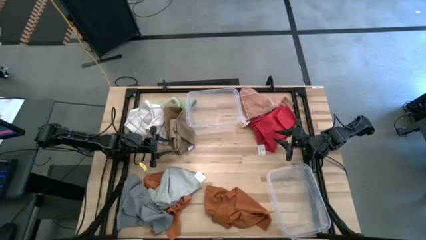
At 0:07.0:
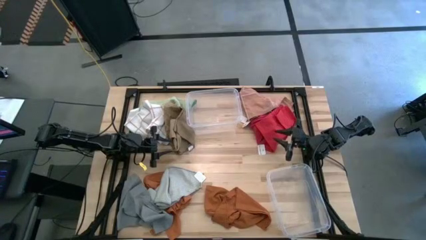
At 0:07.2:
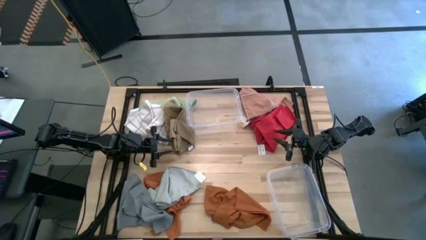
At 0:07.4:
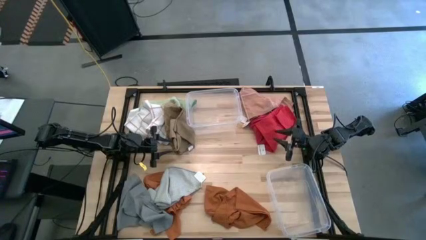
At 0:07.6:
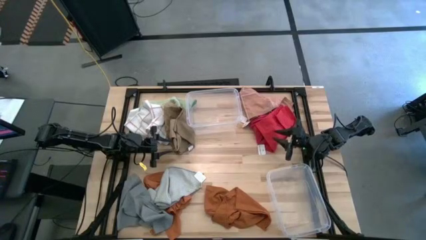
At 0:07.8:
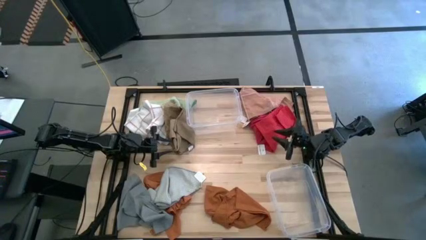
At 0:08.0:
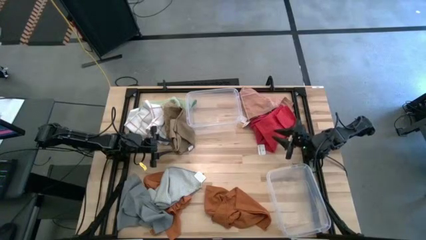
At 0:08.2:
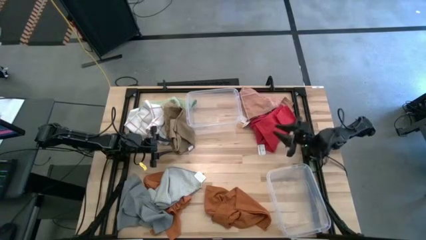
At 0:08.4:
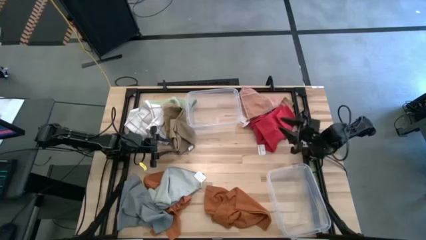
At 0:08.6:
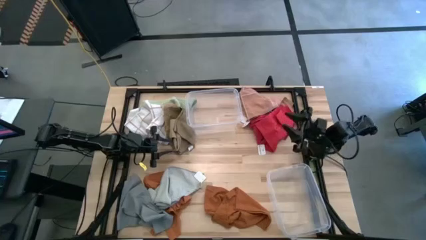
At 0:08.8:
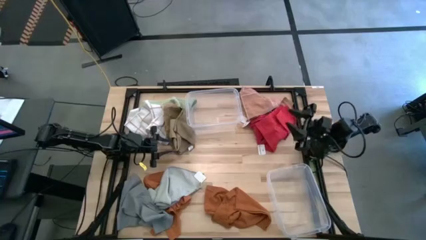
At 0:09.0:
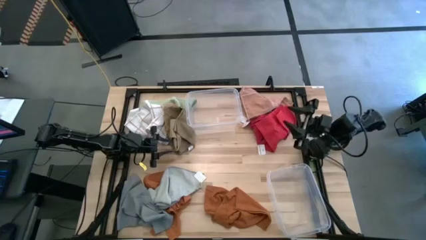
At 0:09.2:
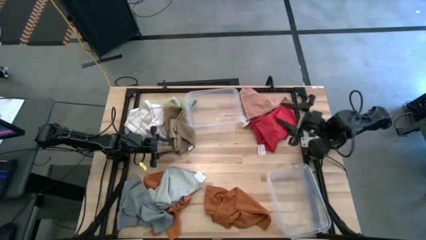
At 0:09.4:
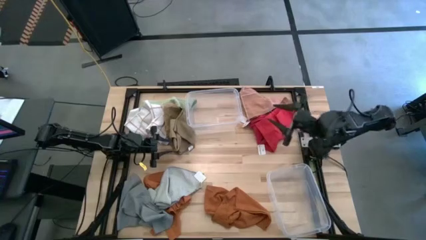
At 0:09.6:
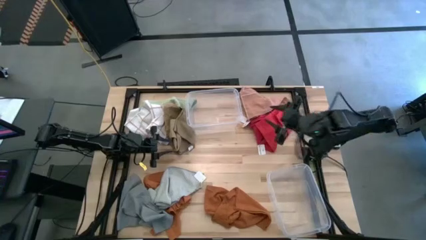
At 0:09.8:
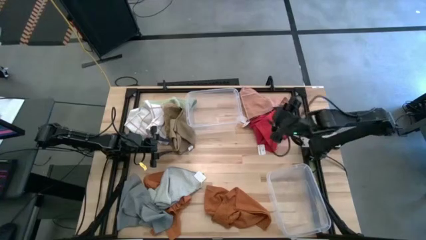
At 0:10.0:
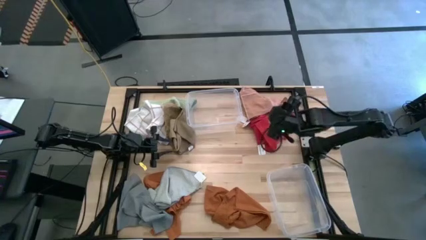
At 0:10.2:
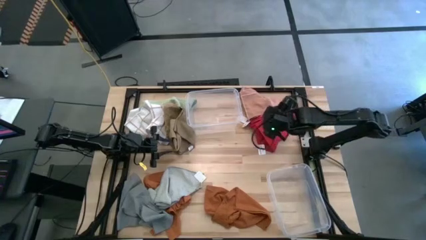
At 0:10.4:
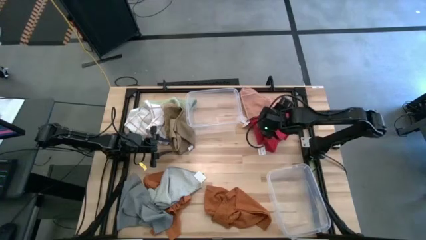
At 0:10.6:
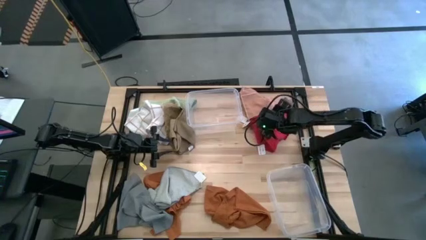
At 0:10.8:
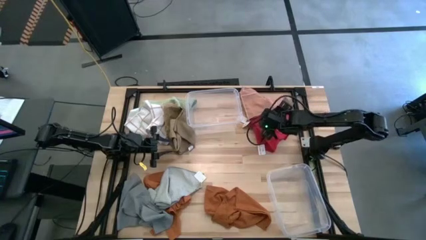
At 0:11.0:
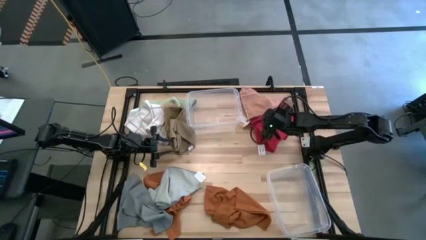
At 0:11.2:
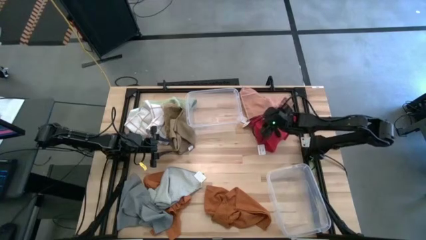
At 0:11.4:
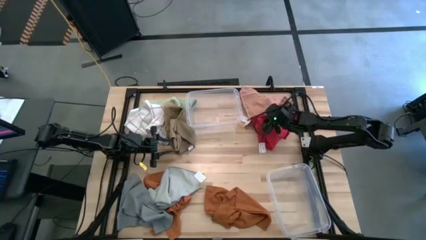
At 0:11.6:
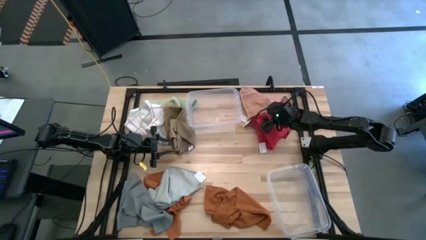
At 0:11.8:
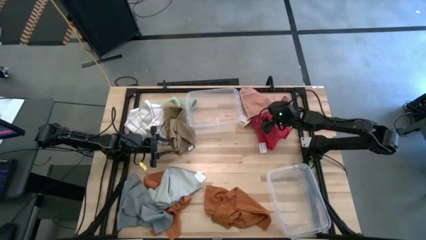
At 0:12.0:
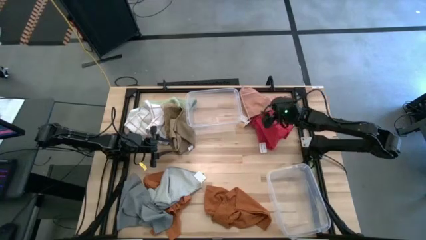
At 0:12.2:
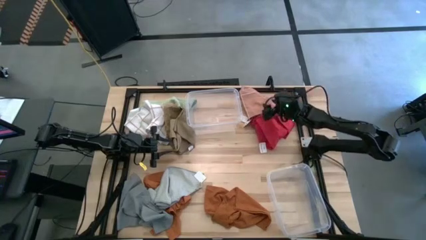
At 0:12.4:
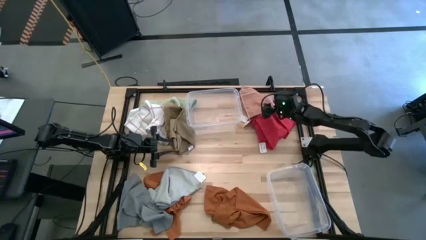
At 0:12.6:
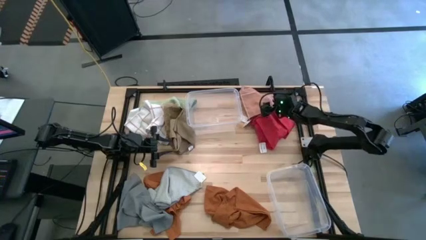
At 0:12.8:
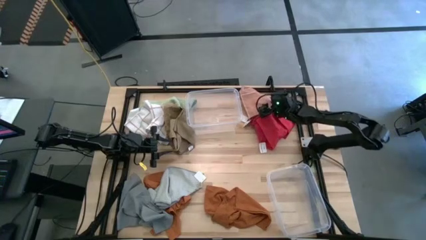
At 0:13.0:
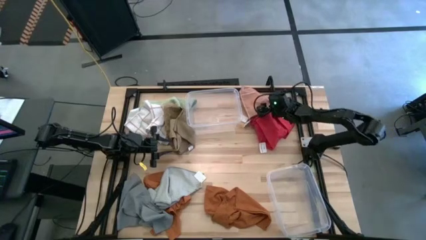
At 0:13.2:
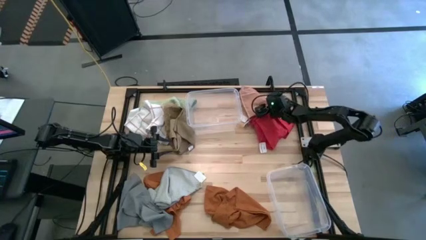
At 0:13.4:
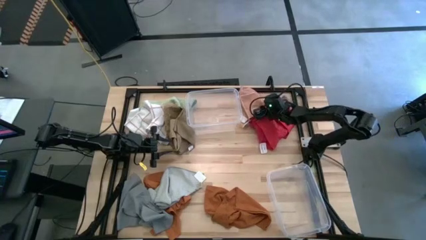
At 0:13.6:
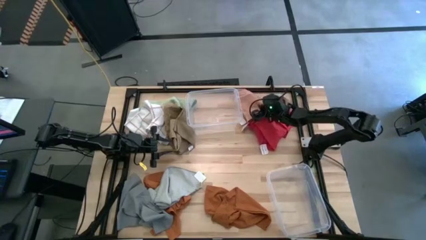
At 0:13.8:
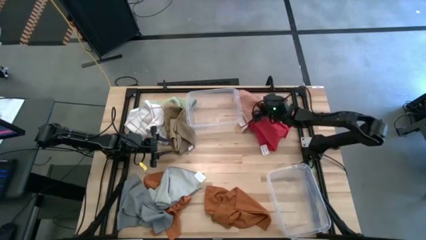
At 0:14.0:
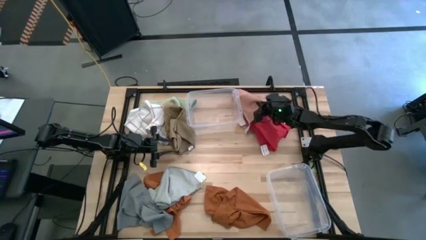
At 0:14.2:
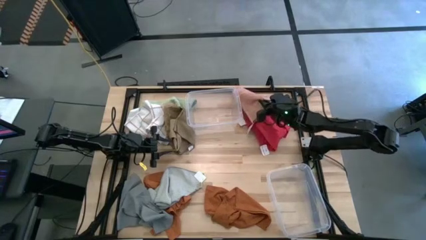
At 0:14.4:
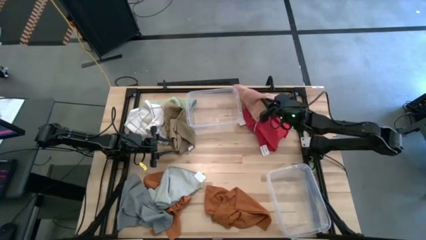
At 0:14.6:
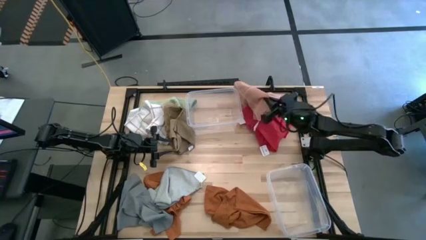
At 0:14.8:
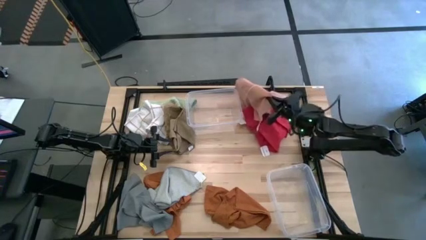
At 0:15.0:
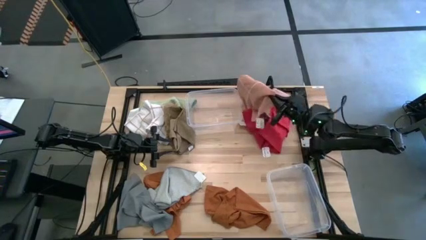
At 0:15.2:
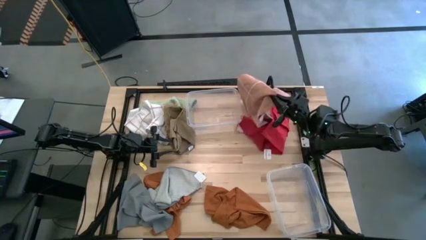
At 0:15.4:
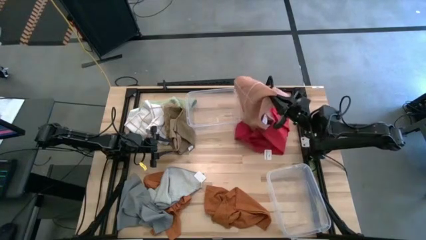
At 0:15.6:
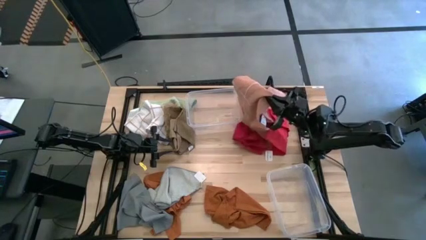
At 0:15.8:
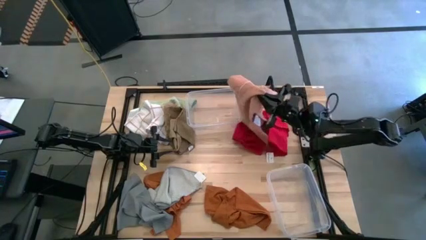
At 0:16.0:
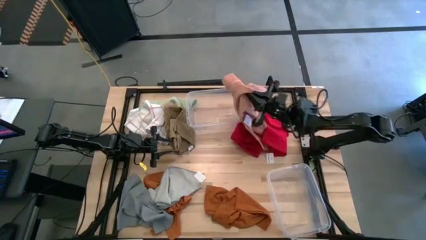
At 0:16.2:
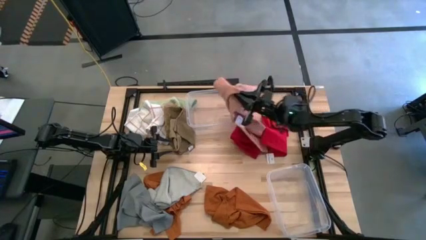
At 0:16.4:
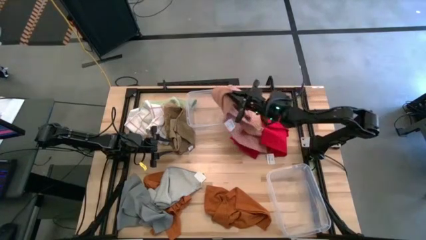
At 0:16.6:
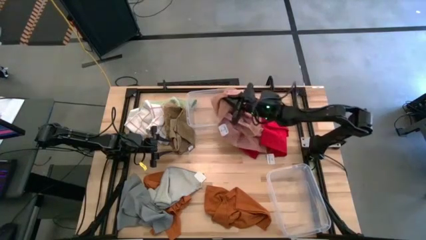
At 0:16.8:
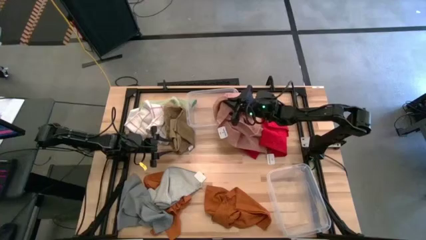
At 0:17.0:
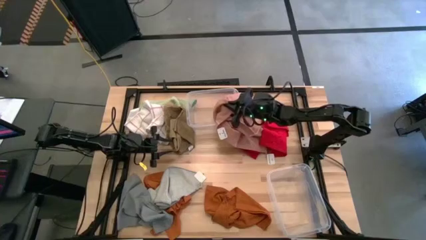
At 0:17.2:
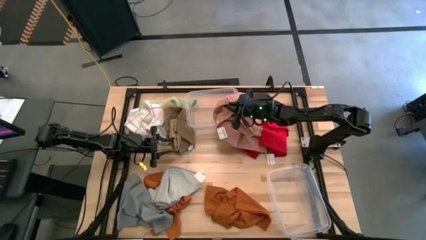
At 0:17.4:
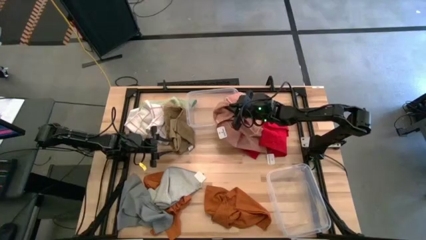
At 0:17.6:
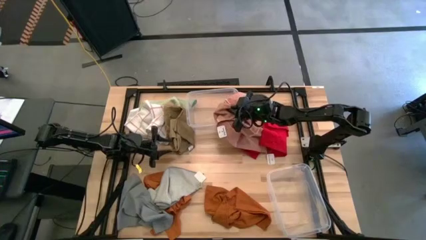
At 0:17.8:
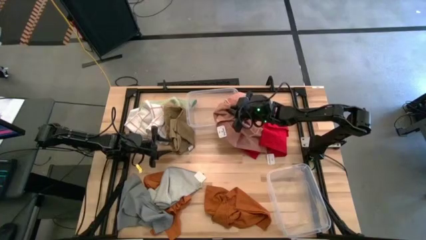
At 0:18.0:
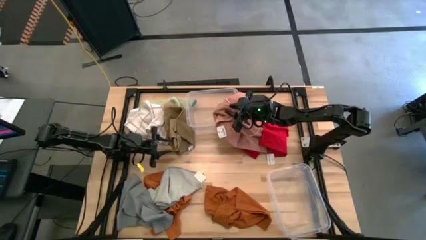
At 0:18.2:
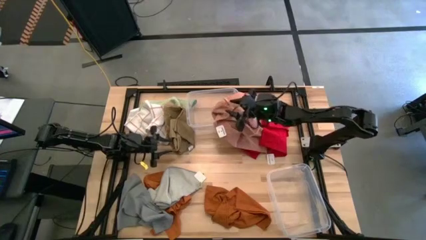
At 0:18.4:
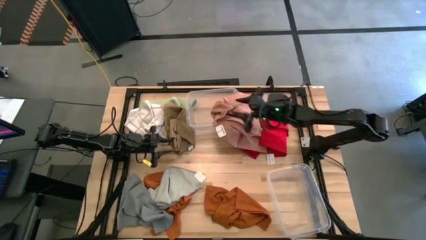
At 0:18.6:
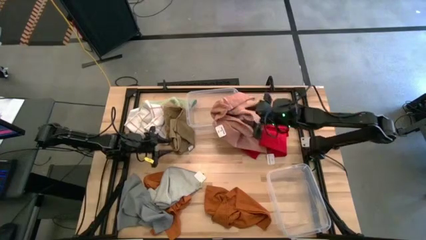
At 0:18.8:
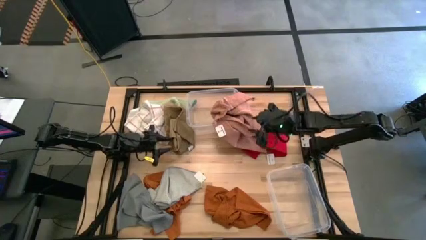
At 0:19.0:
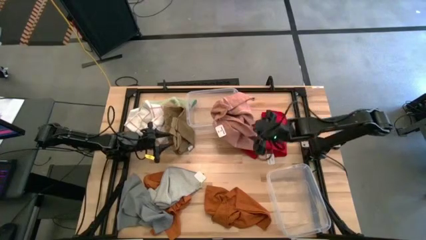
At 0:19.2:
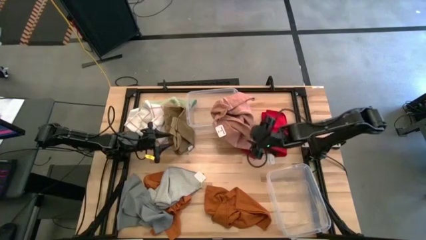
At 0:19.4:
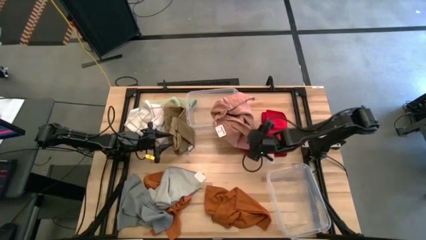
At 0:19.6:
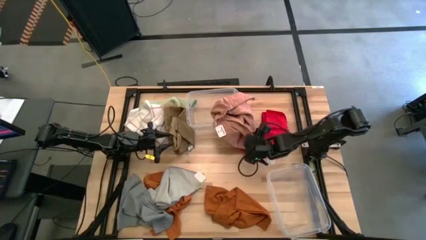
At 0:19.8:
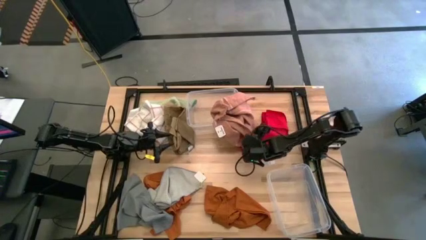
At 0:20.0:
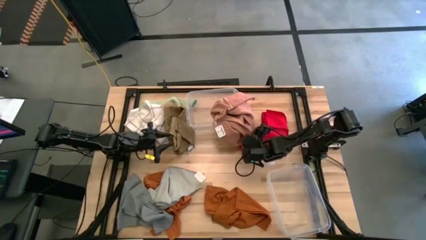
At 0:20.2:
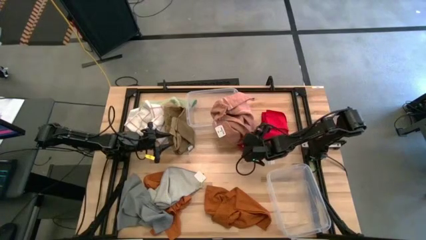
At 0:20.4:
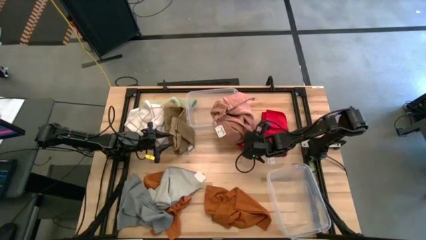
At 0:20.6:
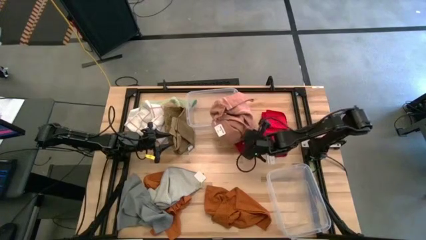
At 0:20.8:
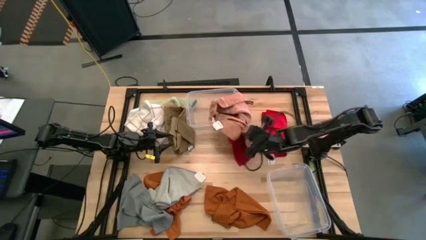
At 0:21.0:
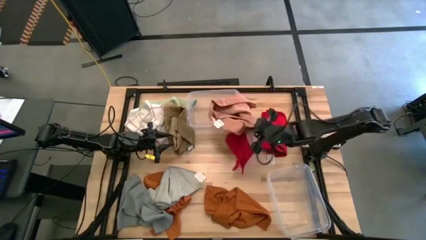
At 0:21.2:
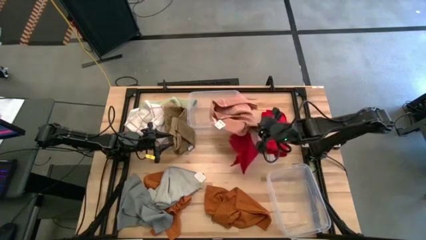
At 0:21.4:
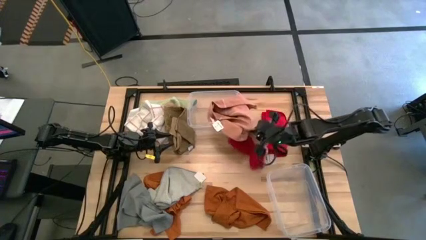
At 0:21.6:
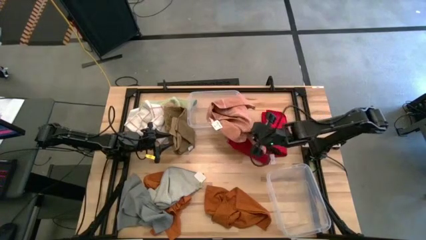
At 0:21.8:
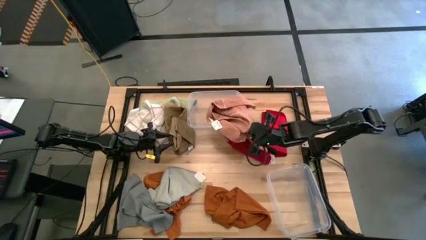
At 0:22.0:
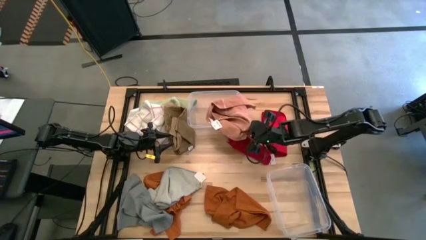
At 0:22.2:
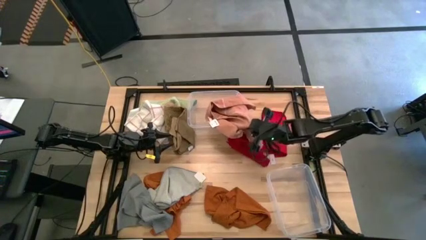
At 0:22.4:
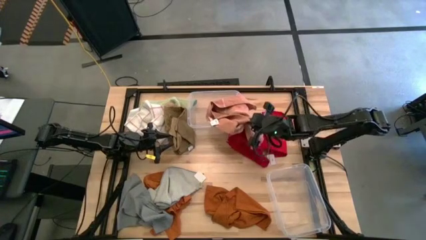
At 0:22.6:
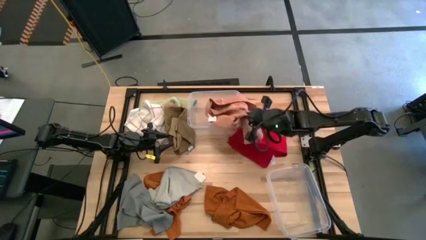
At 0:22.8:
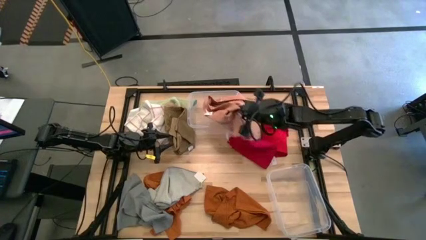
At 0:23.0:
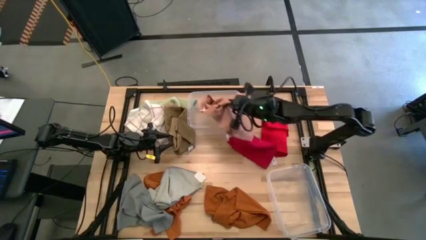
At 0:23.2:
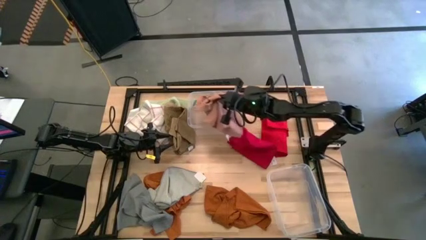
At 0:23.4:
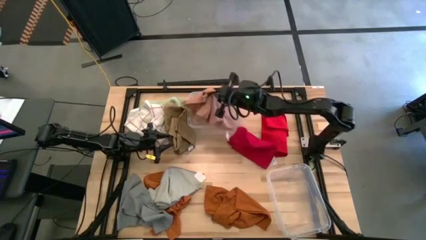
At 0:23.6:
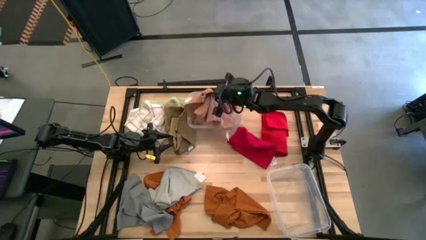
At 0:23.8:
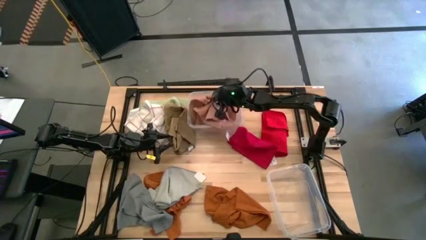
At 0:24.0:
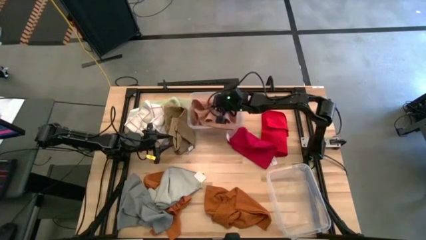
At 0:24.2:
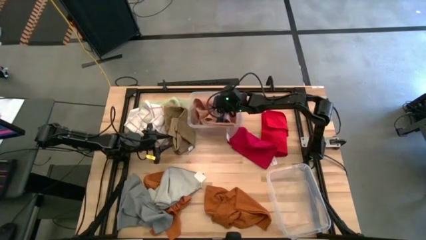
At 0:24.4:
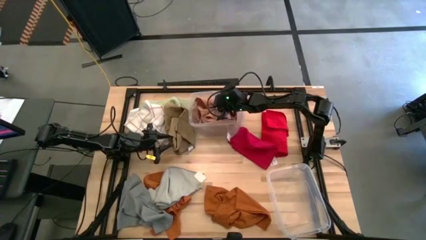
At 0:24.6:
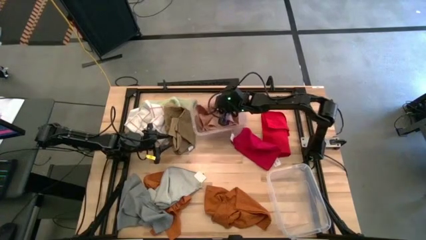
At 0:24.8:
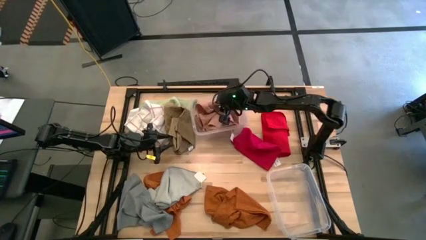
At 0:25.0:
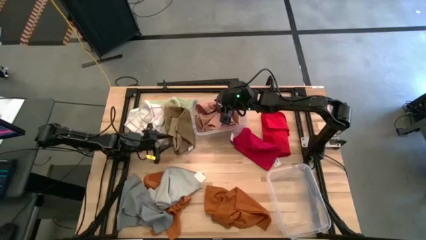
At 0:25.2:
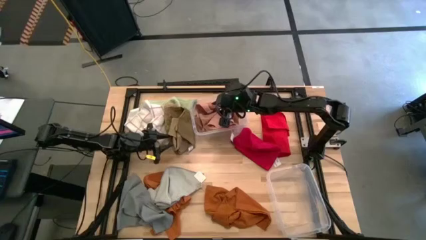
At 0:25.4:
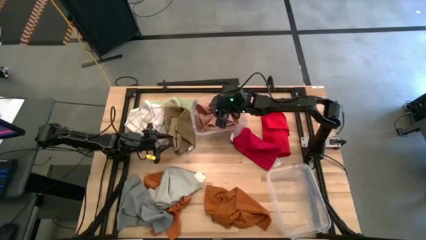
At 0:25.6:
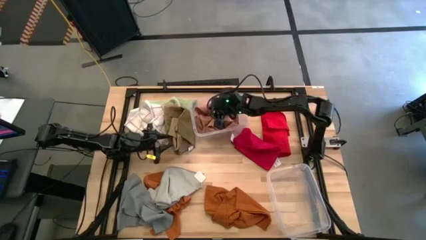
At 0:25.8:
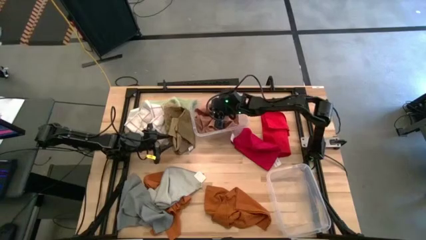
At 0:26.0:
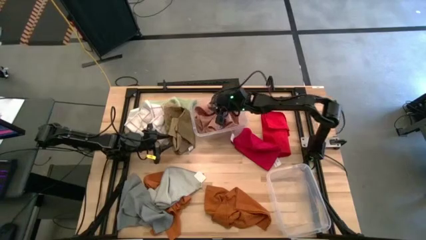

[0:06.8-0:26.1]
Task: Sort towels by color in basket
Put the pink towel into the top transparent bin
